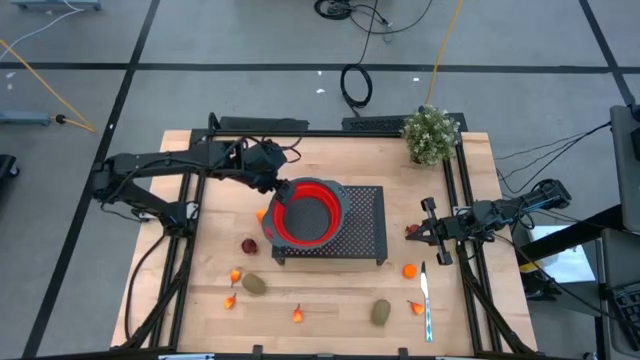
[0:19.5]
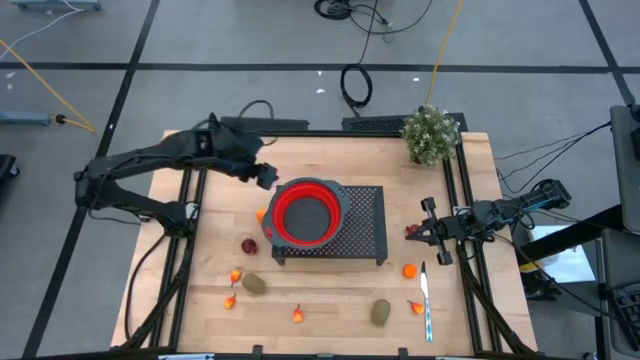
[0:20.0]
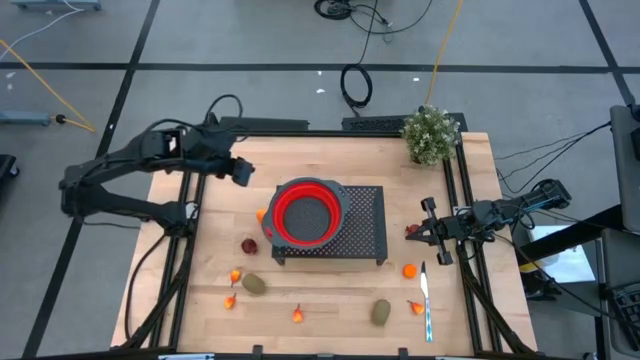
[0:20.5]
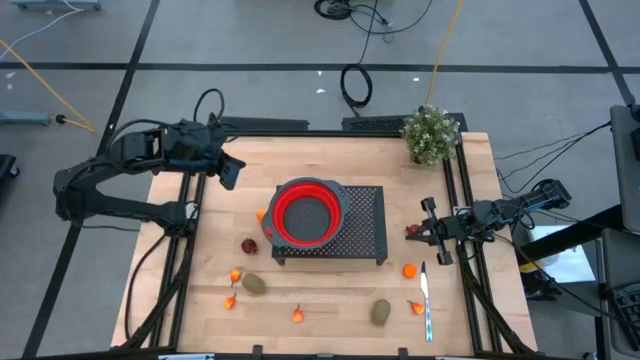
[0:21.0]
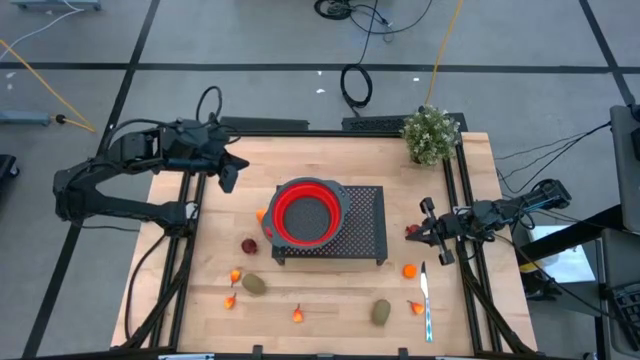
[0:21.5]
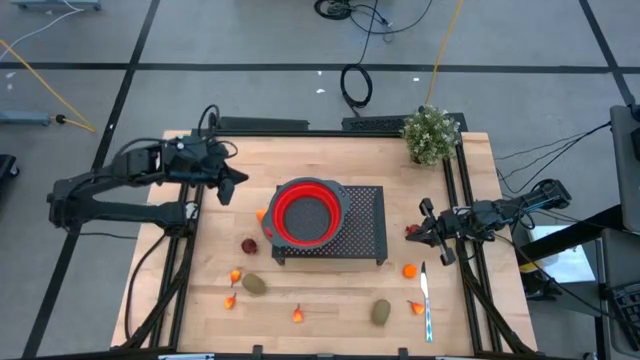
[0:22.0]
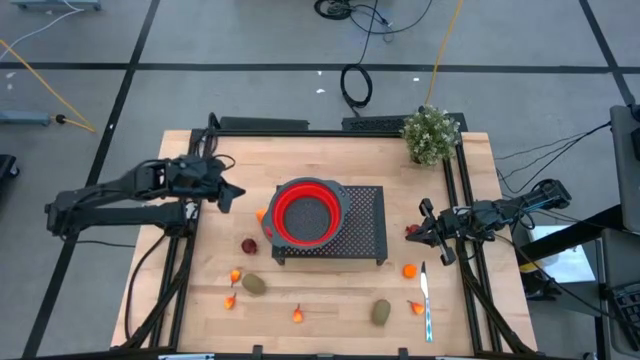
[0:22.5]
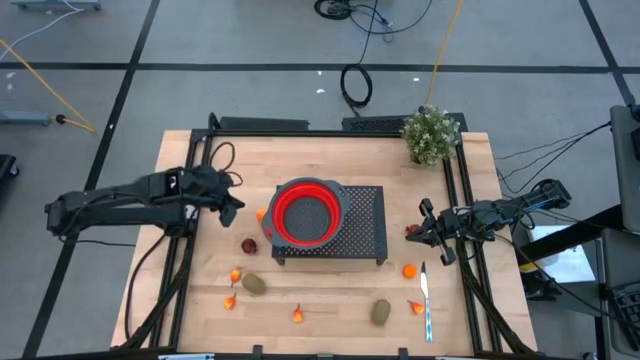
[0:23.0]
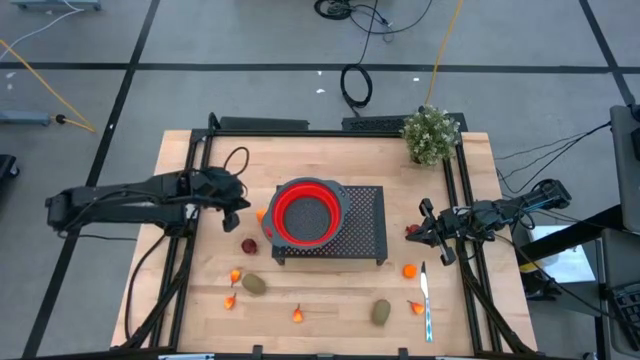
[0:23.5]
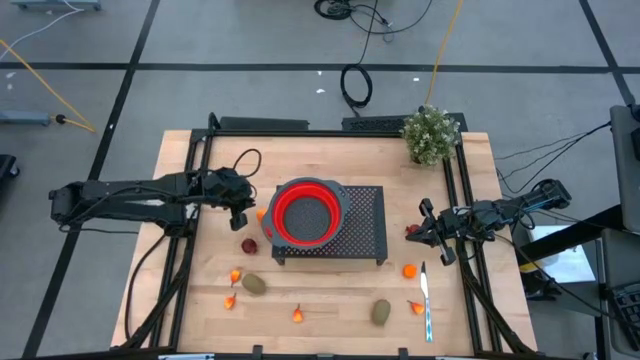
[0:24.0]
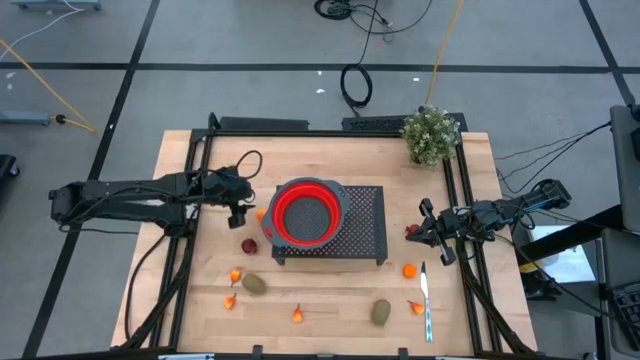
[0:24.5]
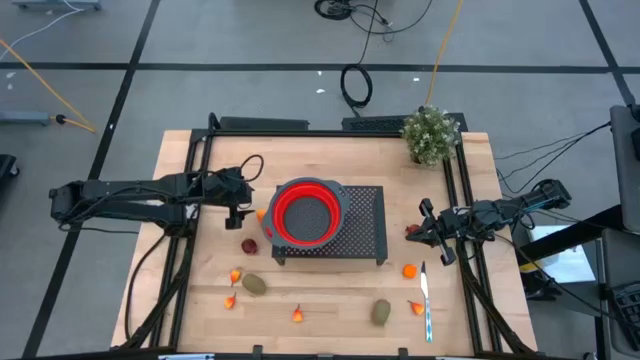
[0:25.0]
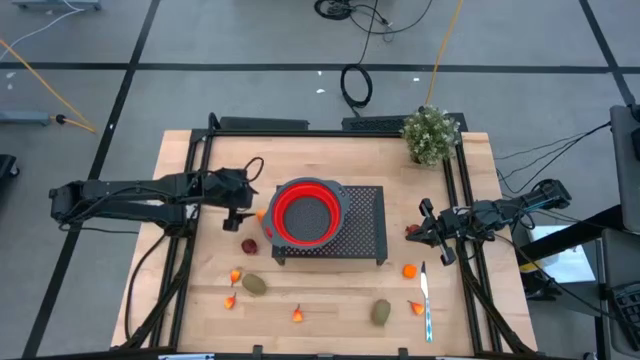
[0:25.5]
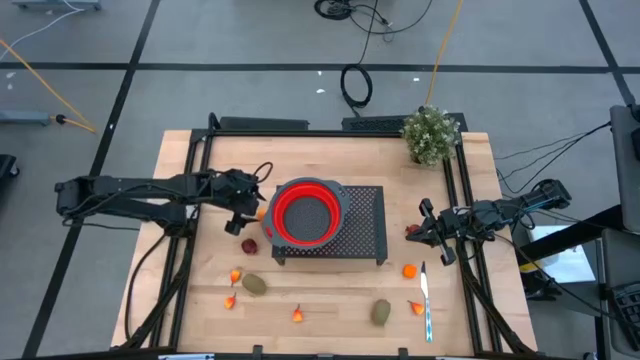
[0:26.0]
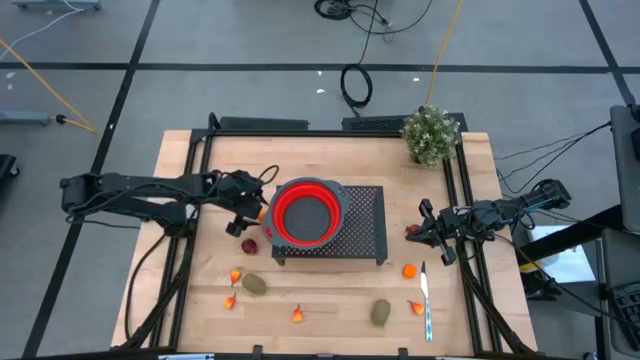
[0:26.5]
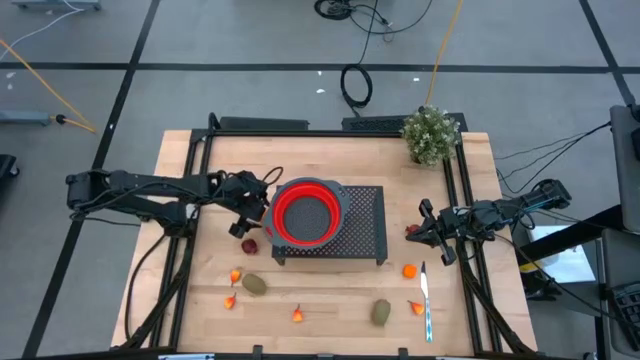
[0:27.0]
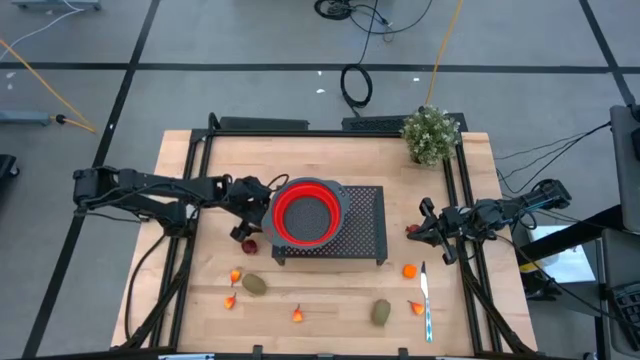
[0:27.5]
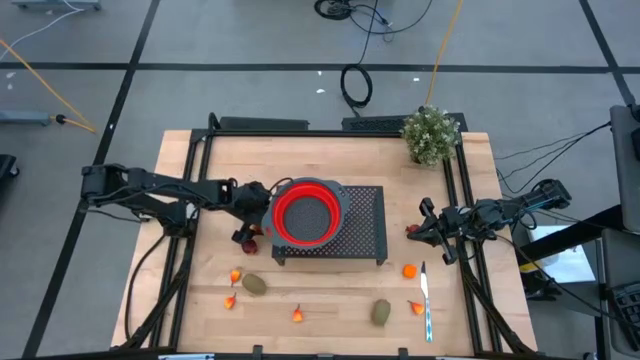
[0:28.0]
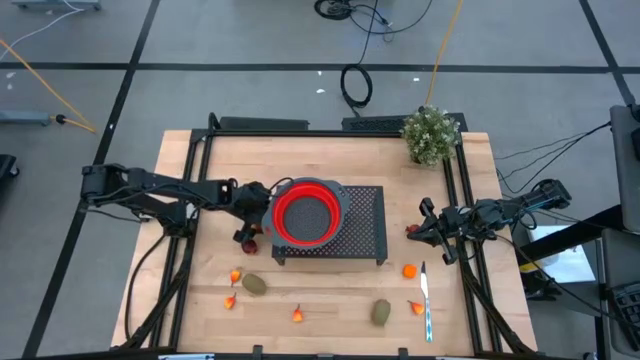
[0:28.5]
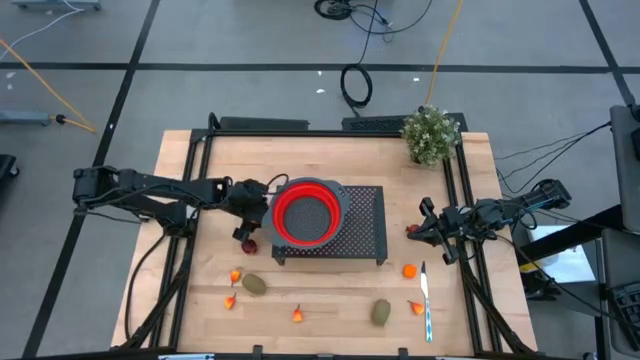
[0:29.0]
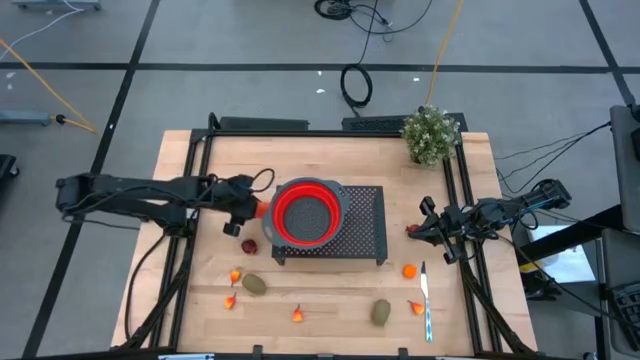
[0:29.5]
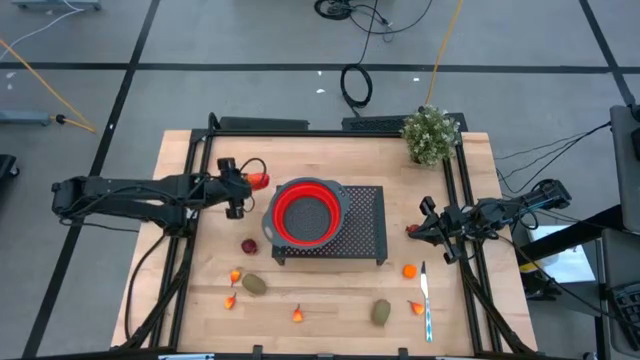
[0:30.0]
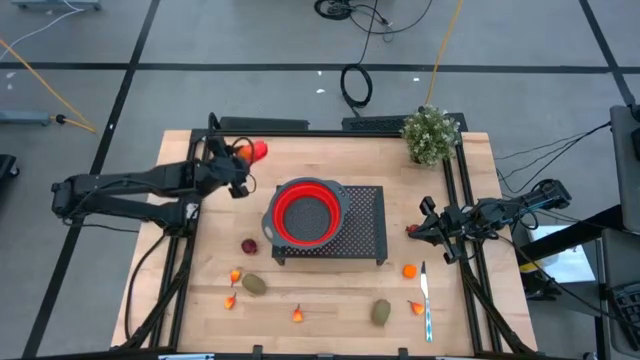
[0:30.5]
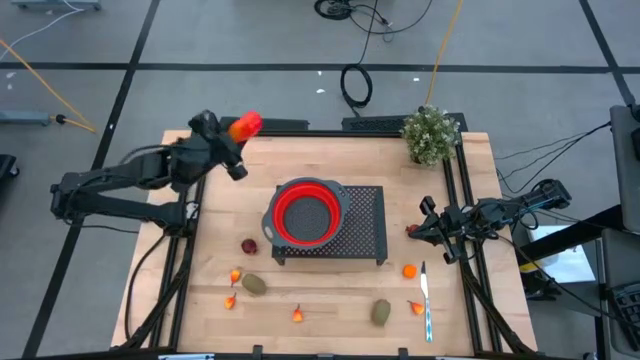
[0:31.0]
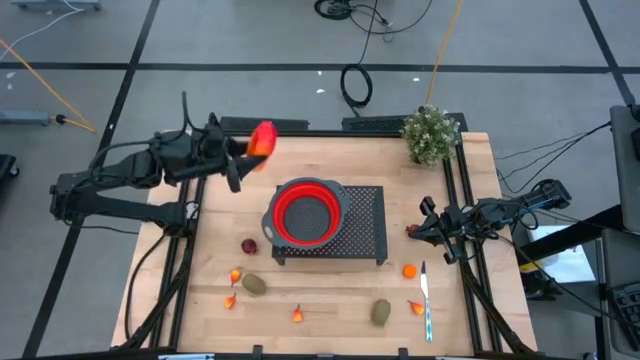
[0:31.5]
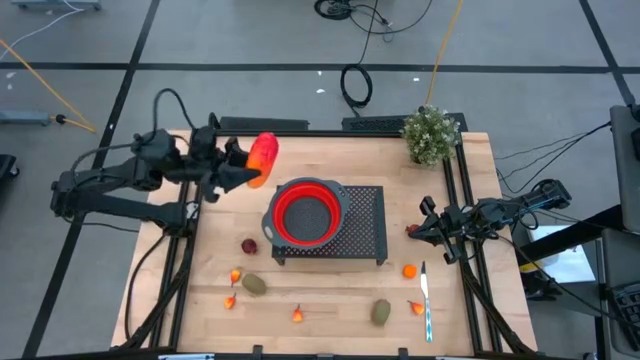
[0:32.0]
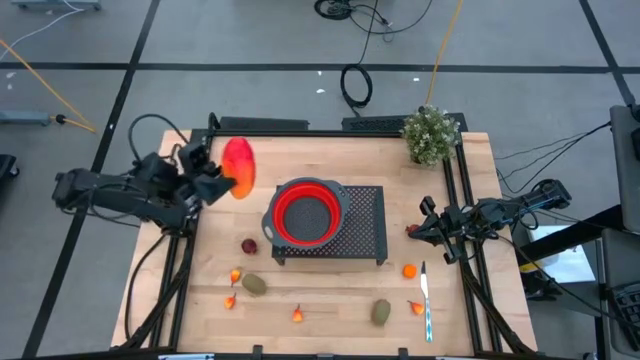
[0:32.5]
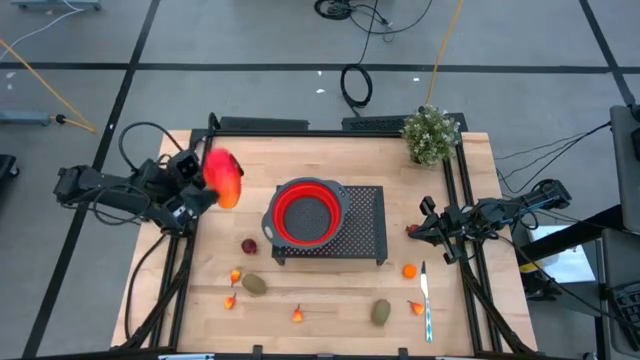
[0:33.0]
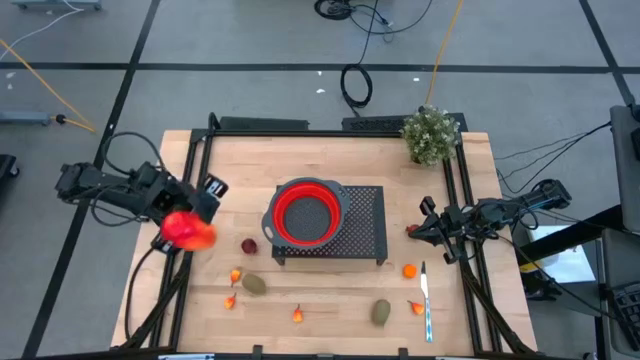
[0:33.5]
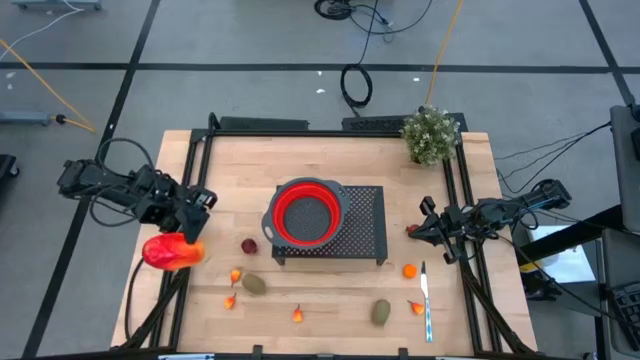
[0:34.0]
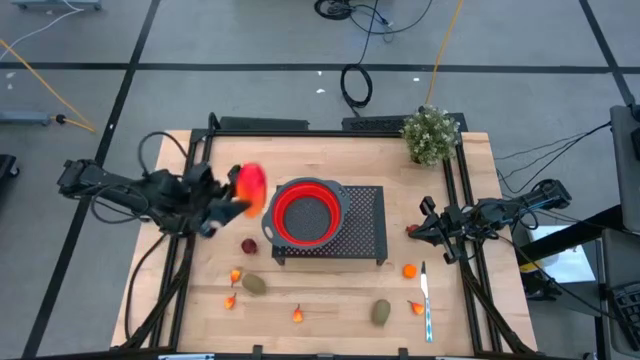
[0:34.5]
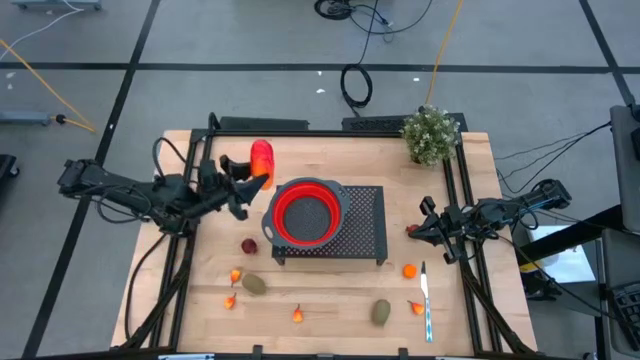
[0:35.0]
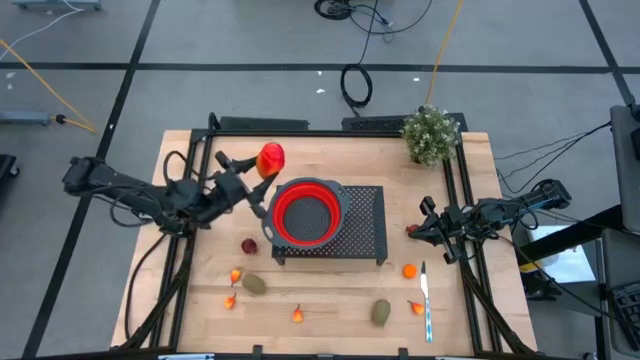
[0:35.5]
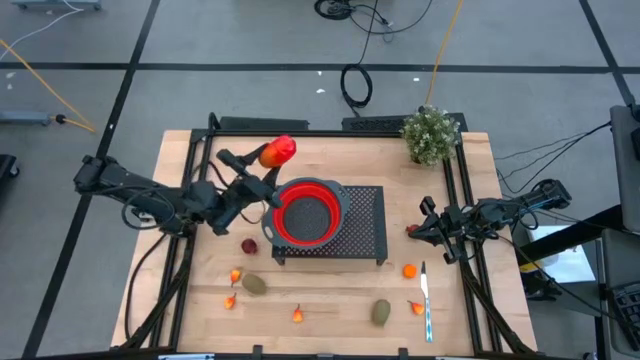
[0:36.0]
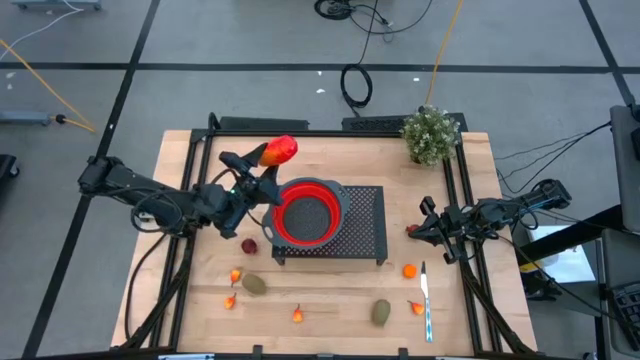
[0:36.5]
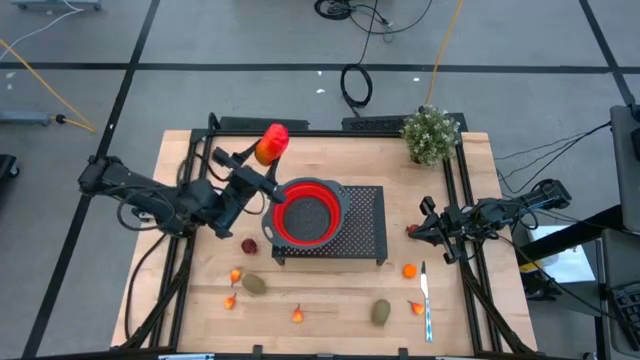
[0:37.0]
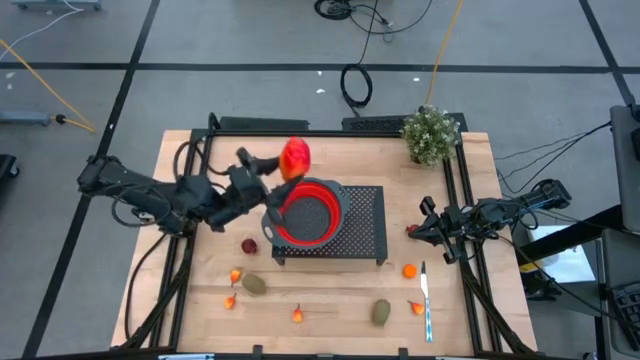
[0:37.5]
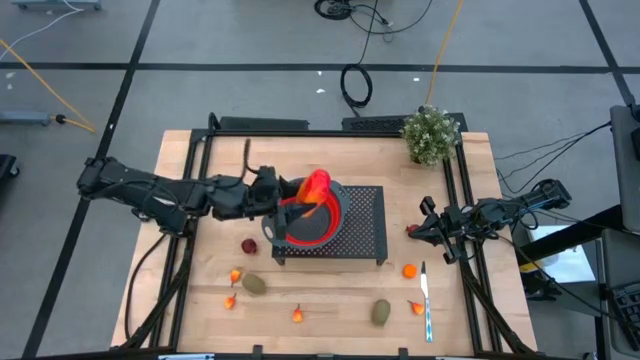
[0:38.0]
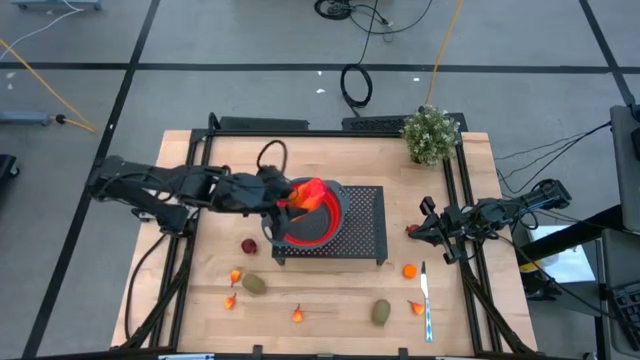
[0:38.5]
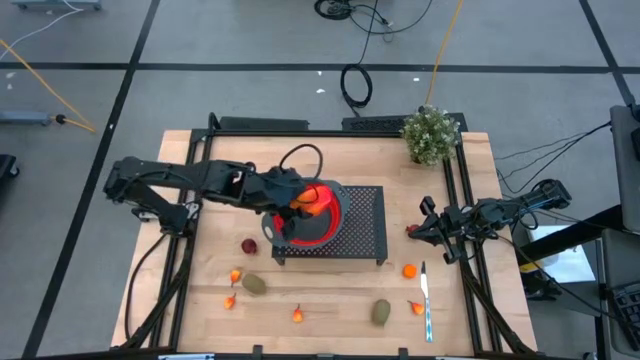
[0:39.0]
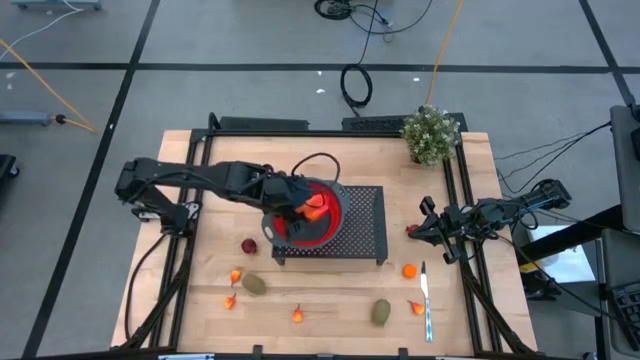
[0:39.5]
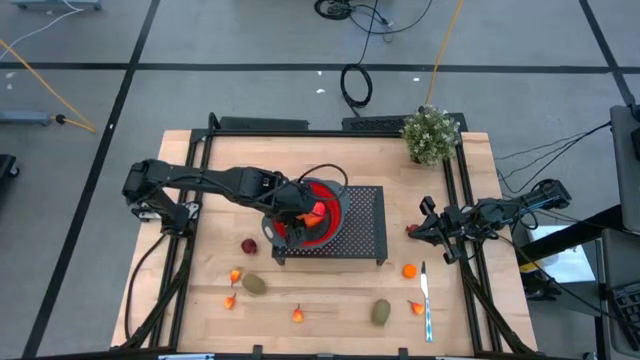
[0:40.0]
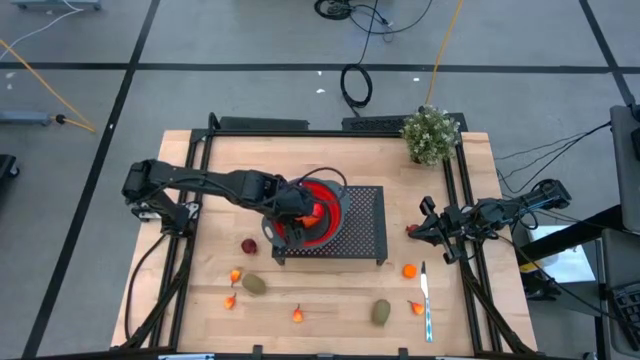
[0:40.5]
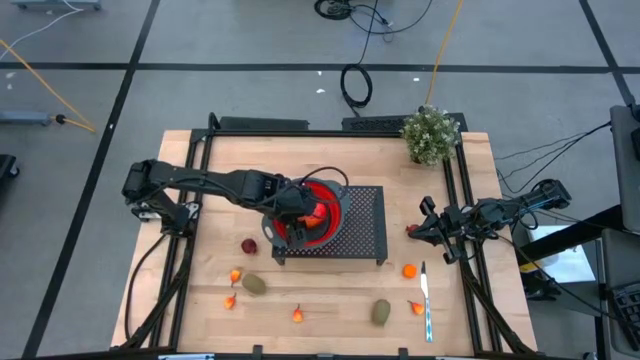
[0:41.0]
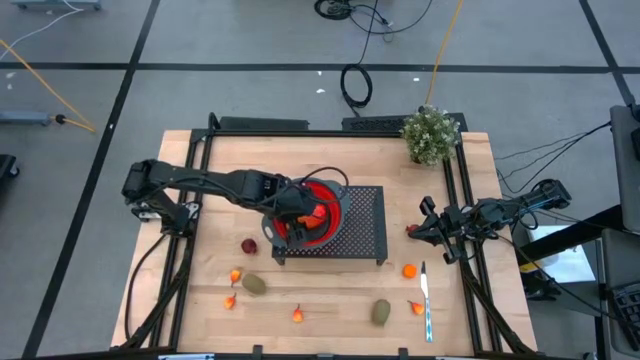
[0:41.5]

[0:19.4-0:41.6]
Task: Pick & Place Fruit
Put the orange mango into the red strainer bowl on the shelf
